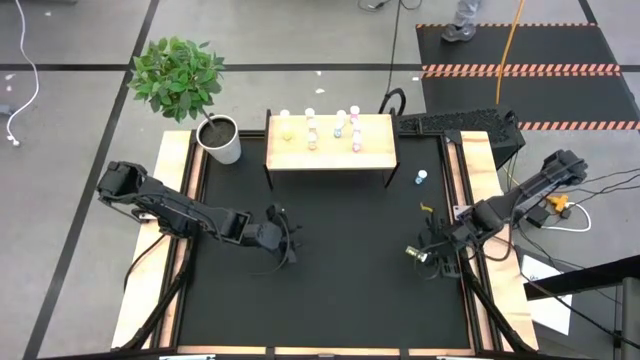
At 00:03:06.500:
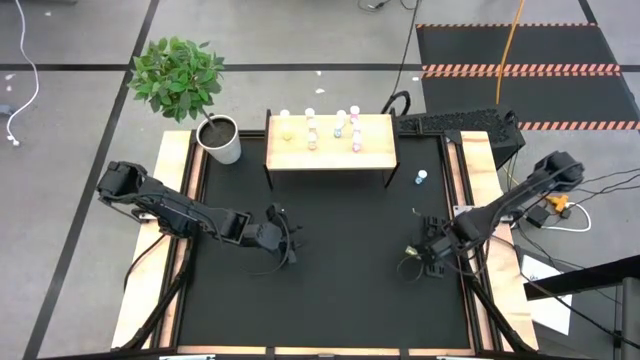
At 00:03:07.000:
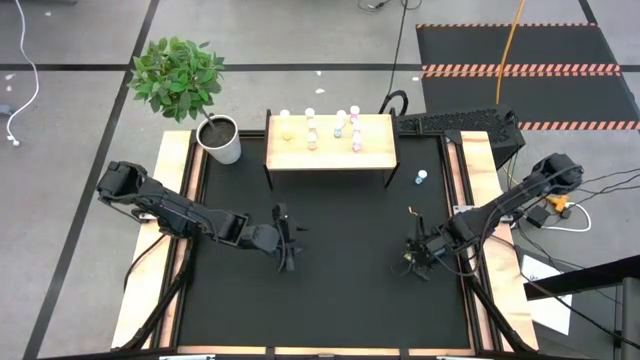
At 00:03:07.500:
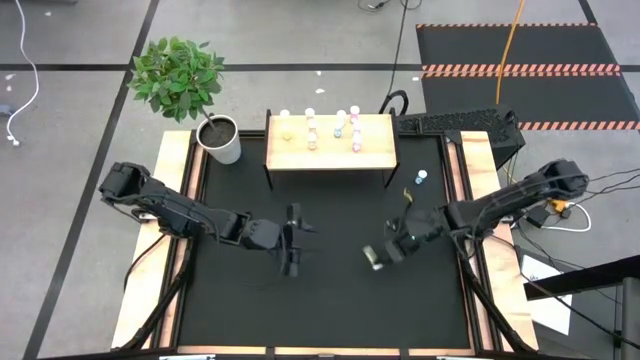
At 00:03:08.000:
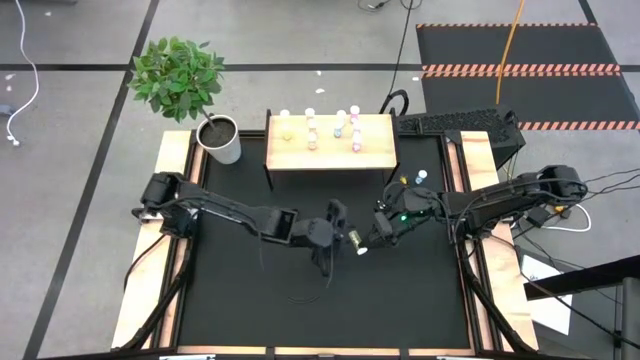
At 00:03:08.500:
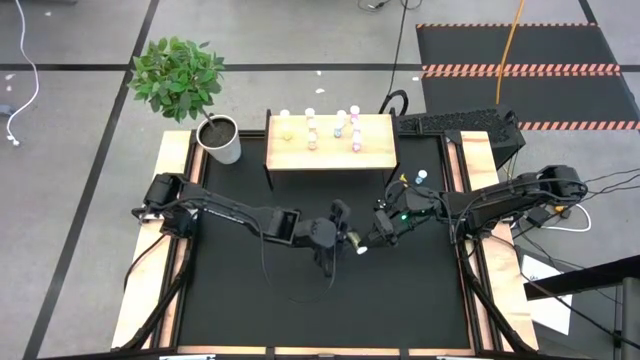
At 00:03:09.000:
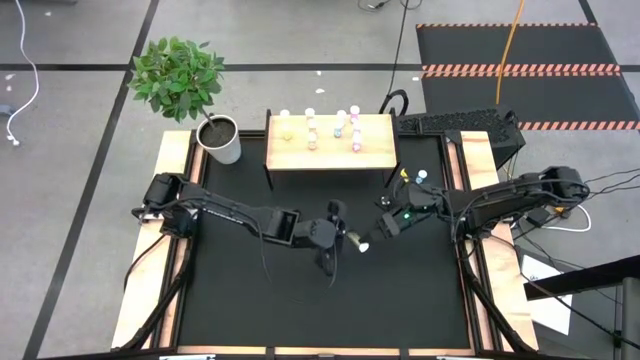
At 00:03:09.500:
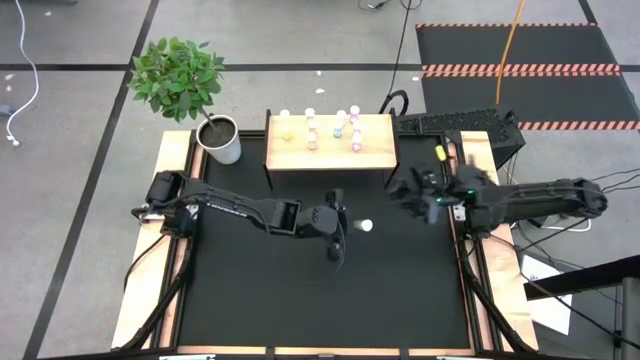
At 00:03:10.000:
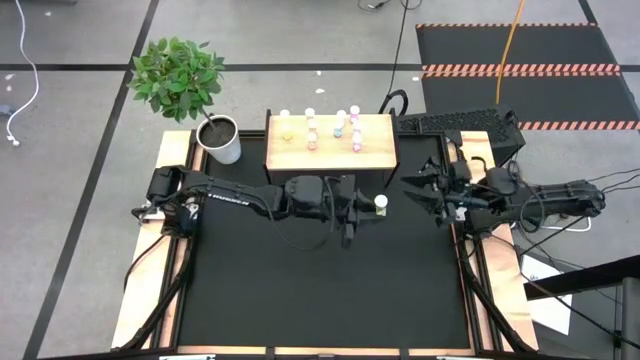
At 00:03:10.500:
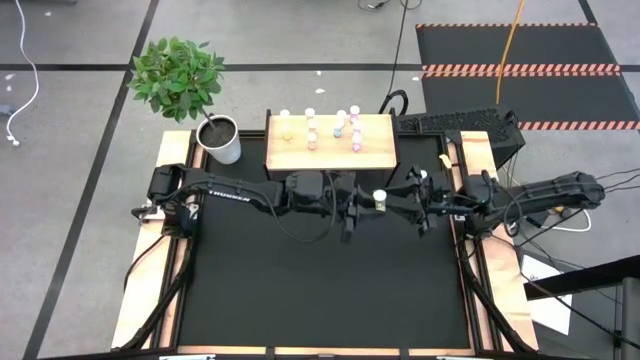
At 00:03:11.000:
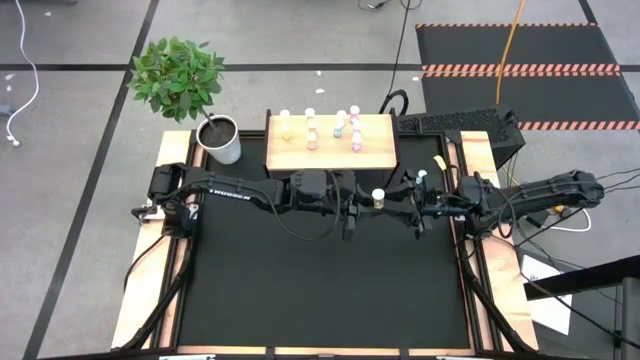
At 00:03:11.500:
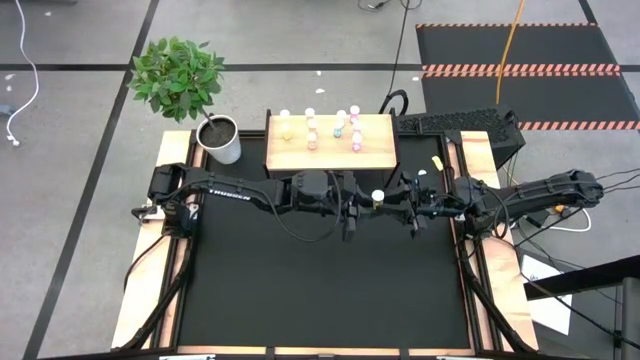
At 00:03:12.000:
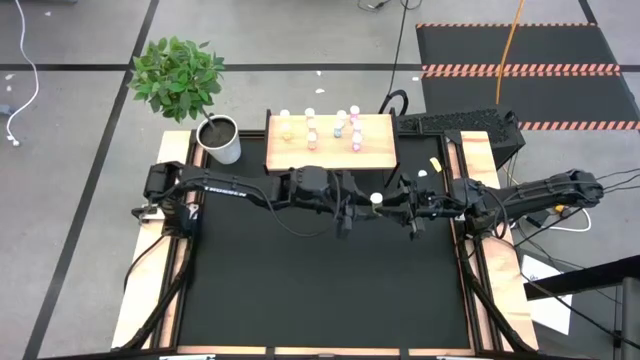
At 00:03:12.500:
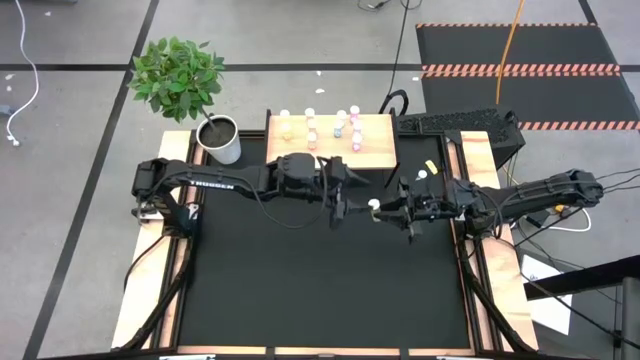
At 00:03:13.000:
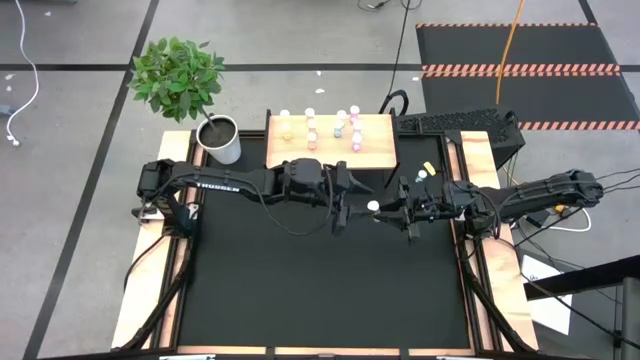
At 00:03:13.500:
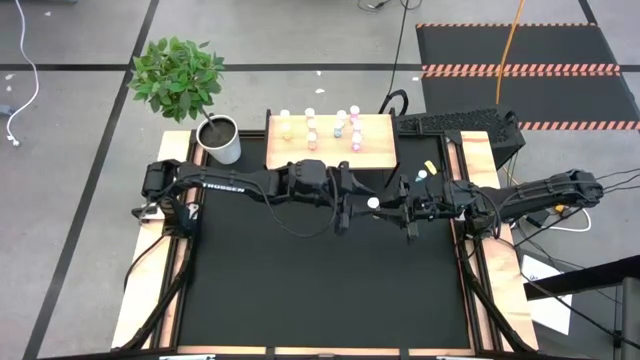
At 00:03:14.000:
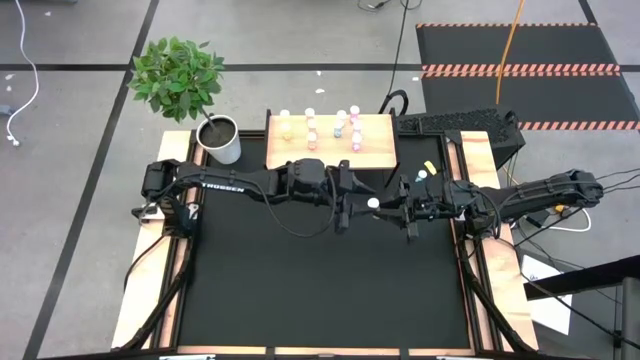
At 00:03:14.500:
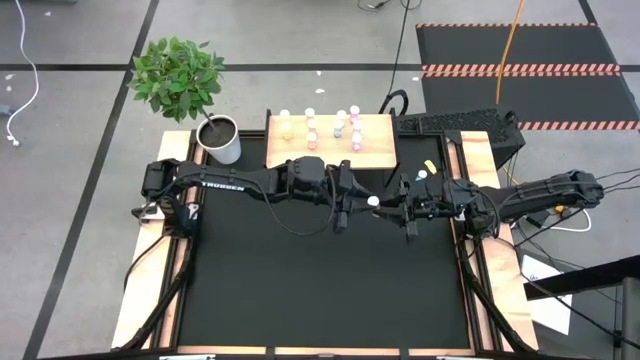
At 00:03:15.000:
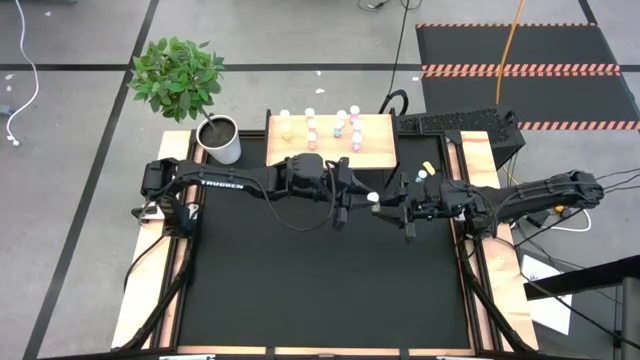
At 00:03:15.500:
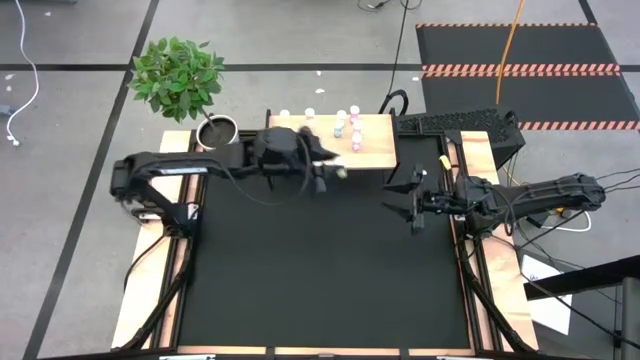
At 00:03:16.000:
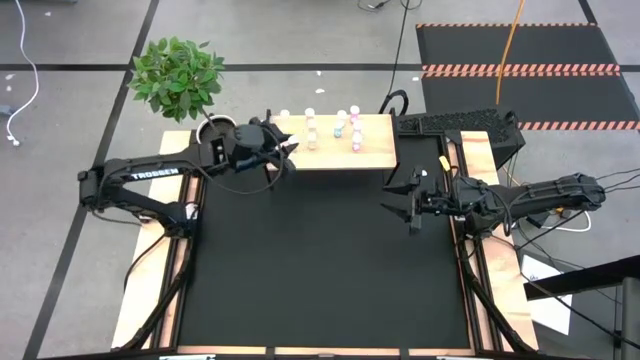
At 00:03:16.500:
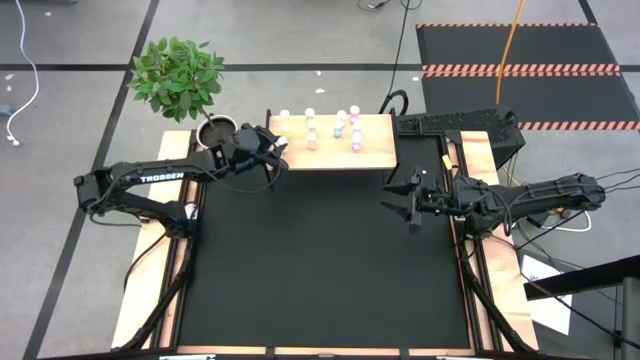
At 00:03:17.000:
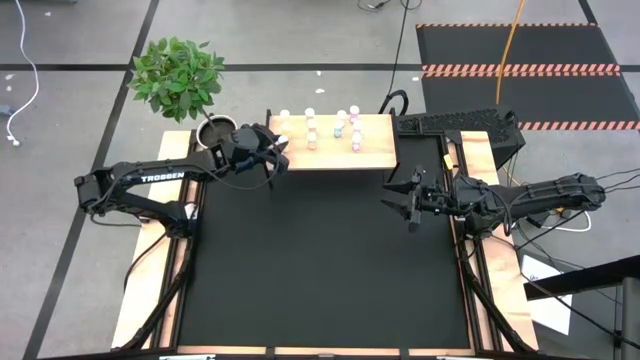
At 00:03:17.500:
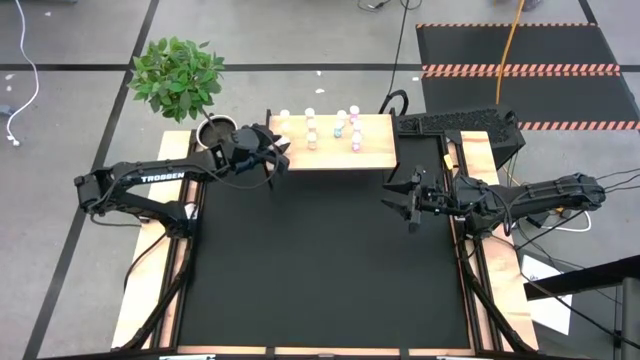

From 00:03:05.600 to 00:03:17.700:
Task: Pick and place medicine bottles onto shelf by color
Put the yellow pill bottle on the shelf aligned with the other yellow pill bottles

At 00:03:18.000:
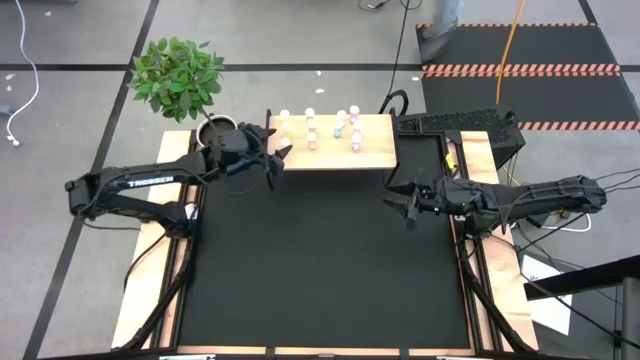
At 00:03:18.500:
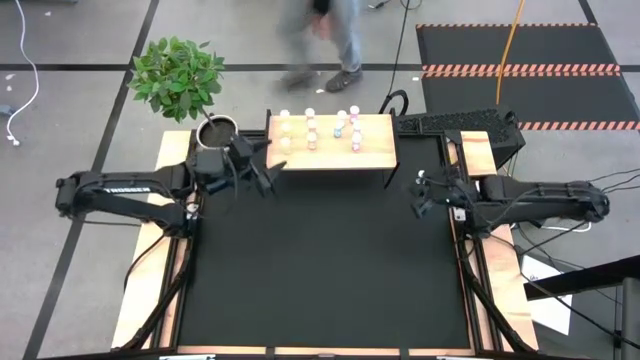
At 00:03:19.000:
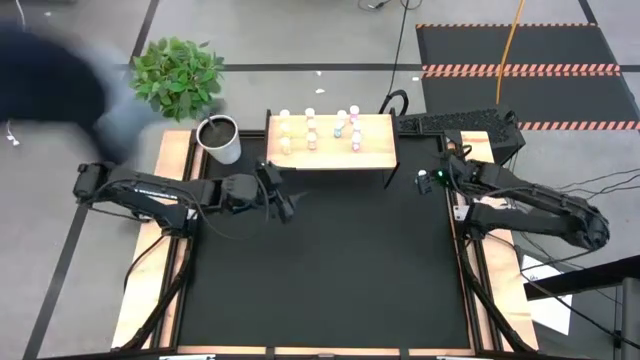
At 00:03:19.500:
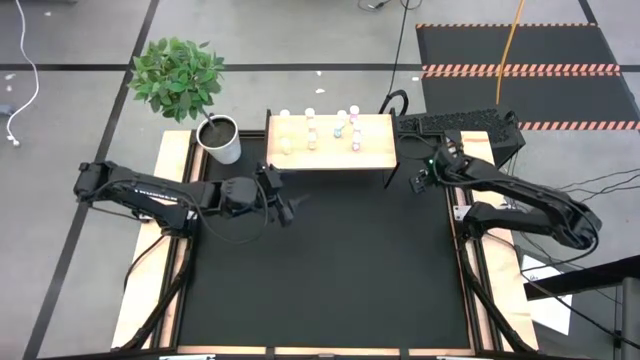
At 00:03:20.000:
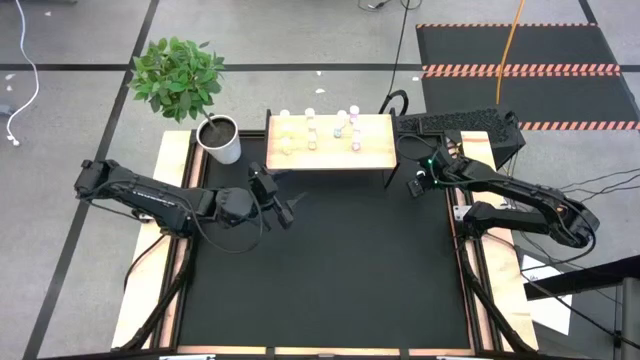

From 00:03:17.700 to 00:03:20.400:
Put the blue pill bottle on the shelf aligned with the other blue pill bottles

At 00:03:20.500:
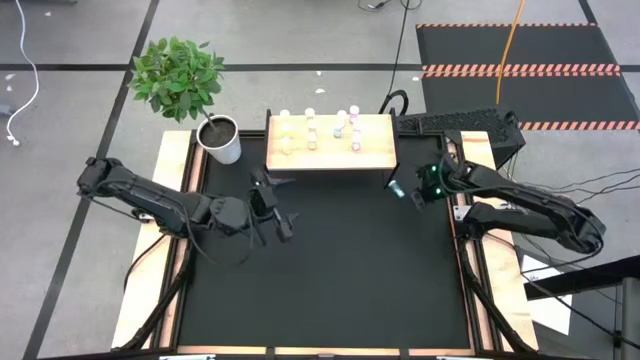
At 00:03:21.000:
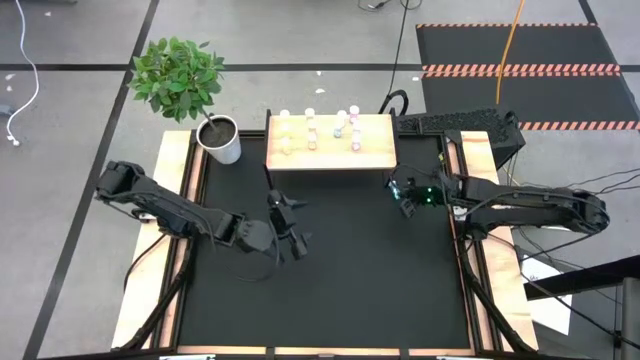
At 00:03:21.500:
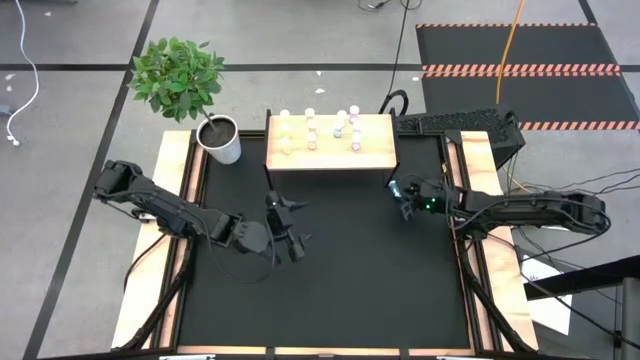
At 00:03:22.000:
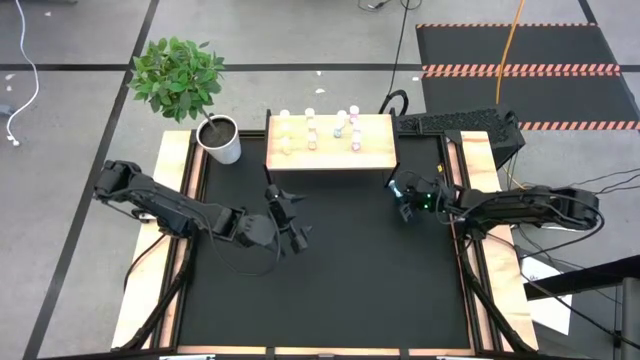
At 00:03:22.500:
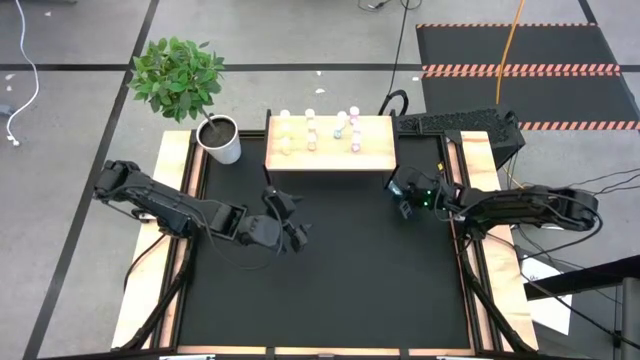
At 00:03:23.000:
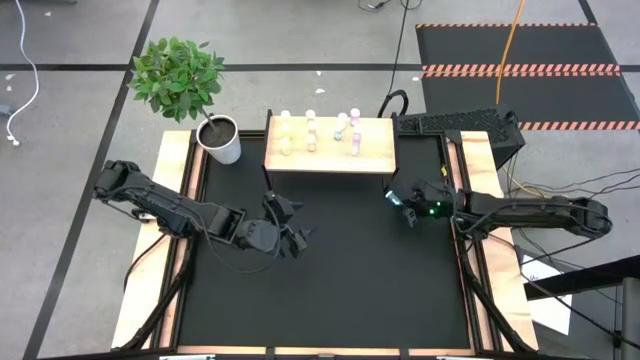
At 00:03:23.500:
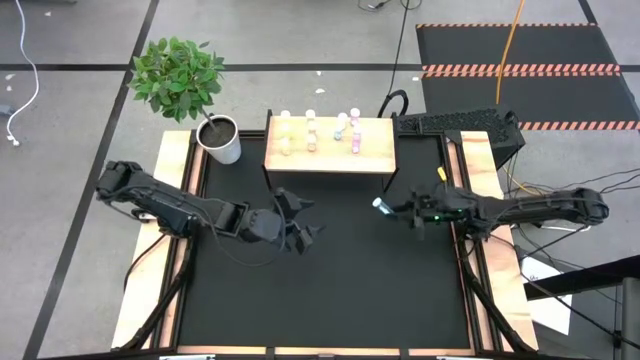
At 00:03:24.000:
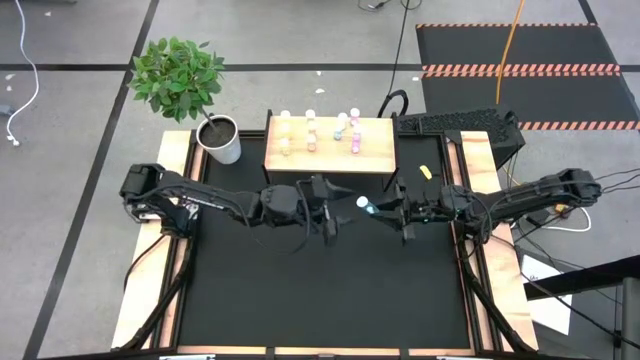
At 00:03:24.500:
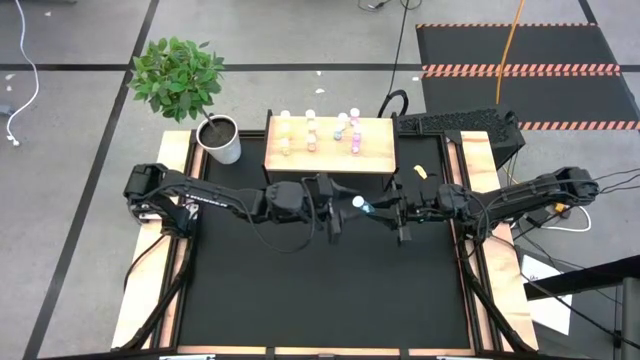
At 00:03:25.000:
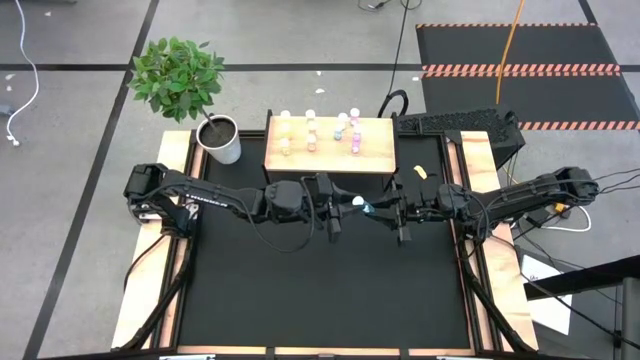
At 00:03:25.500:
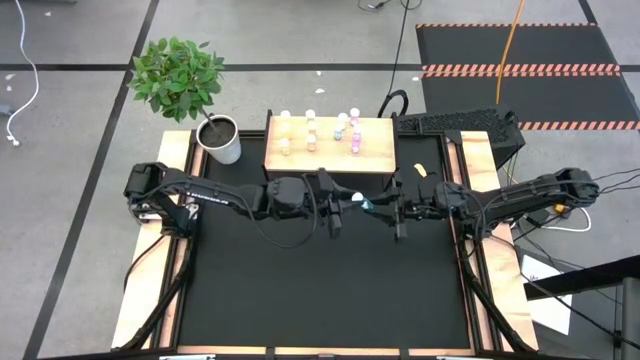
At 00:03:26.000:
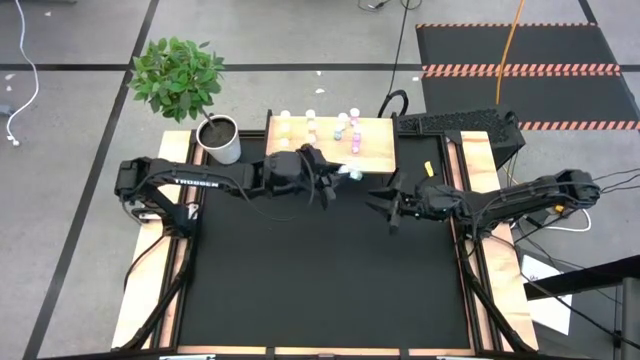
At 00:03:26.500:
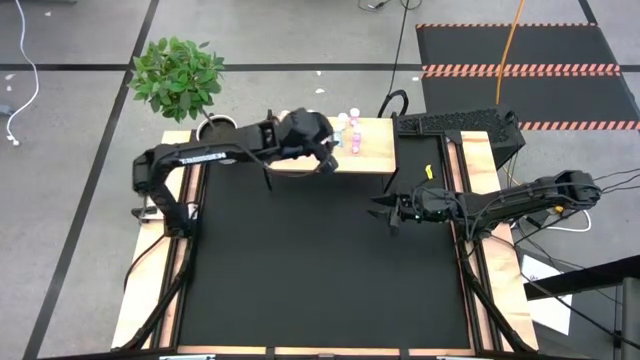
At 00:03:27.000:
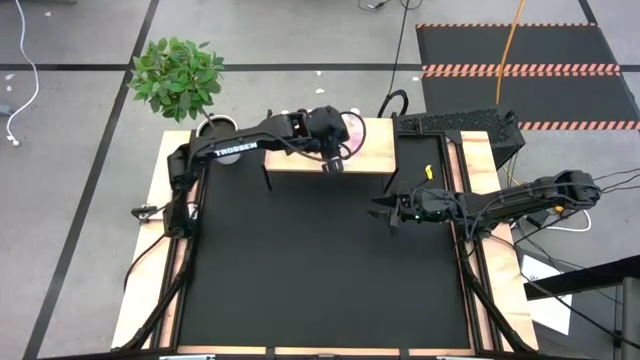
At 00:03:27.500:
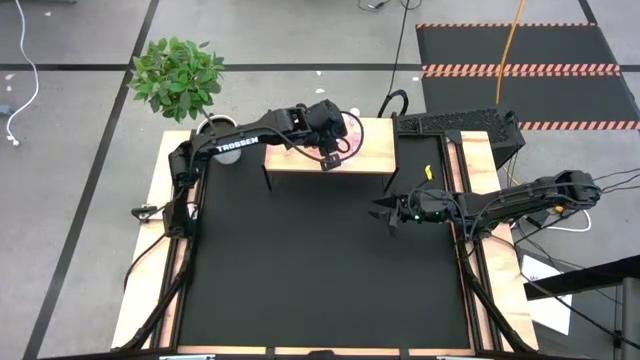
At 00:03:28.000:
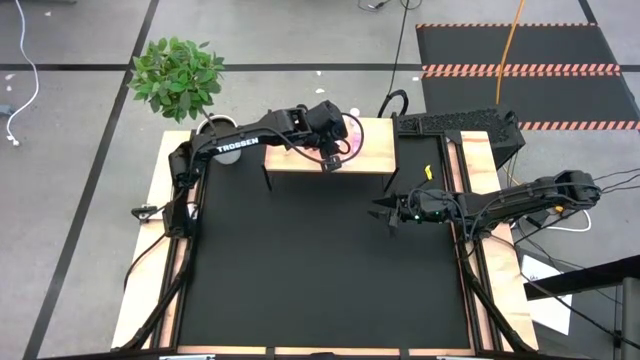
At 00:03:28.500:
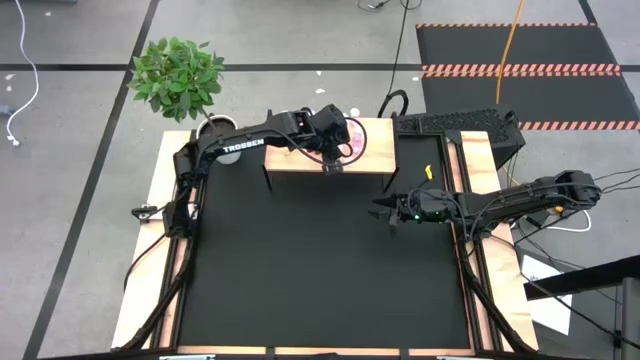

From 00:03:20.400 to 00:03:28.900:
Put the blue pill bottle on the shelf aligned with the other blue pill bottles
